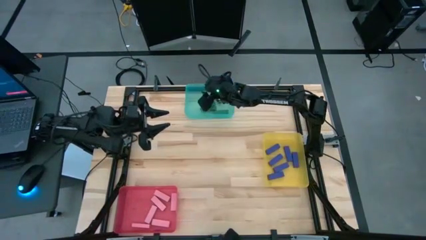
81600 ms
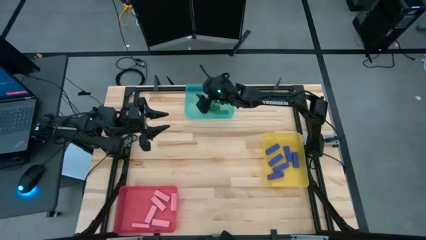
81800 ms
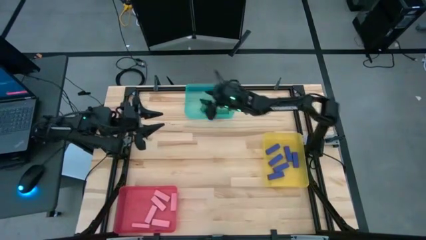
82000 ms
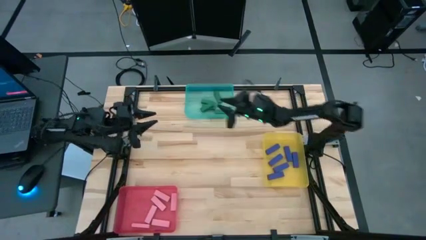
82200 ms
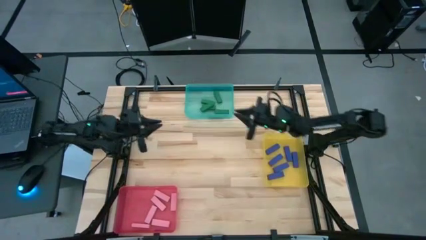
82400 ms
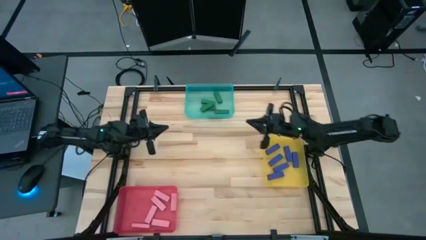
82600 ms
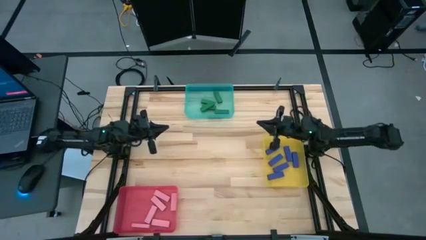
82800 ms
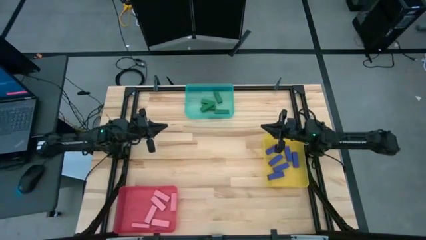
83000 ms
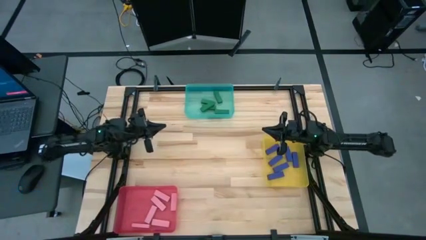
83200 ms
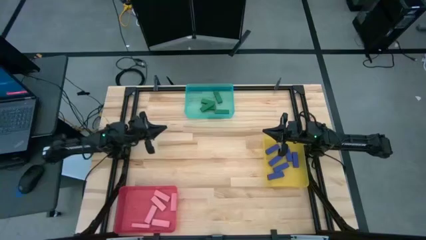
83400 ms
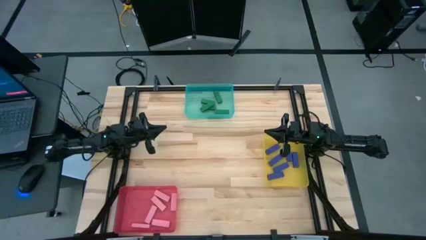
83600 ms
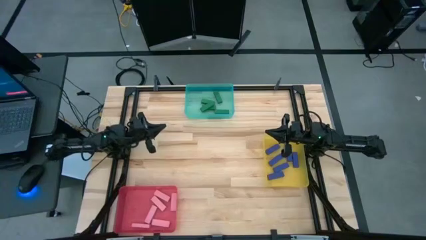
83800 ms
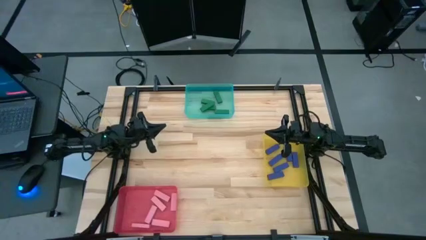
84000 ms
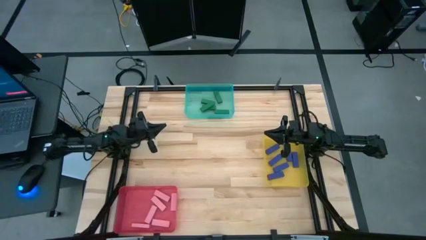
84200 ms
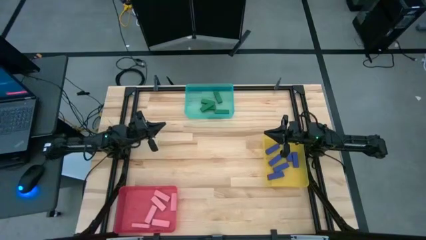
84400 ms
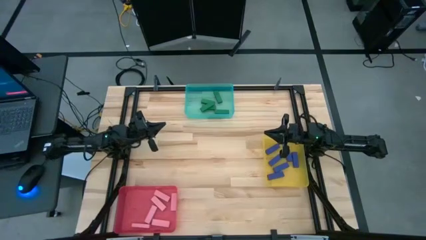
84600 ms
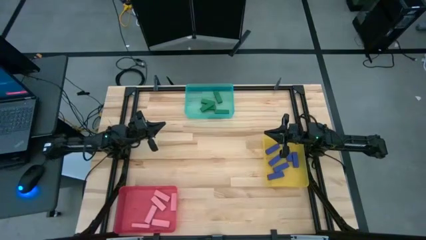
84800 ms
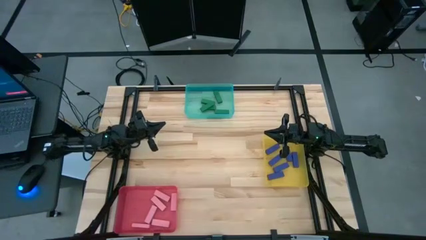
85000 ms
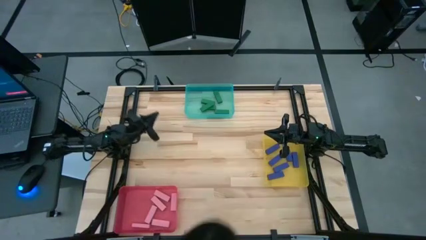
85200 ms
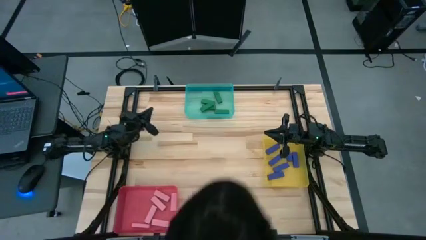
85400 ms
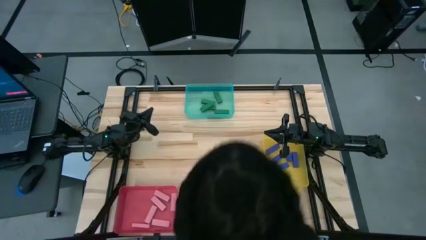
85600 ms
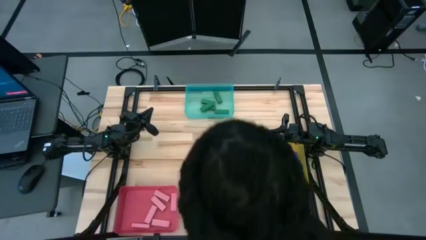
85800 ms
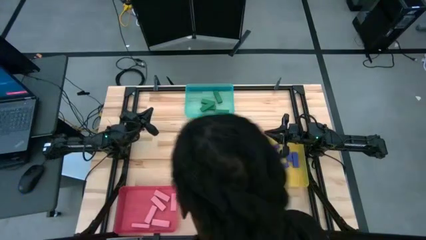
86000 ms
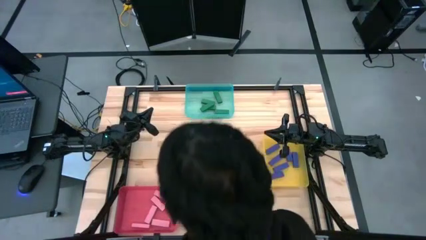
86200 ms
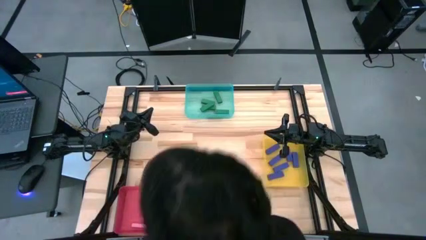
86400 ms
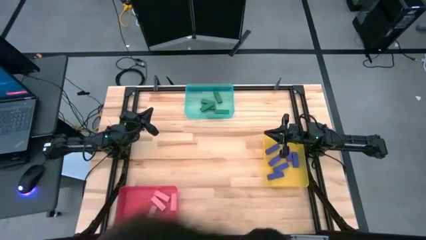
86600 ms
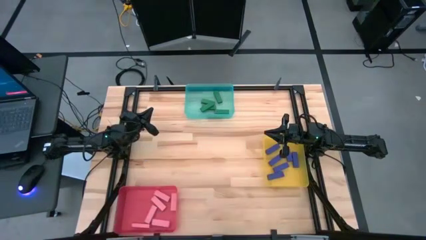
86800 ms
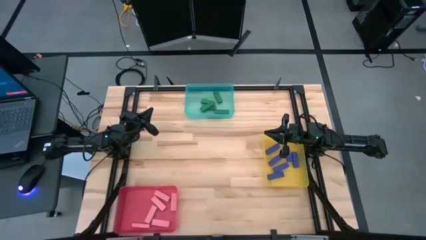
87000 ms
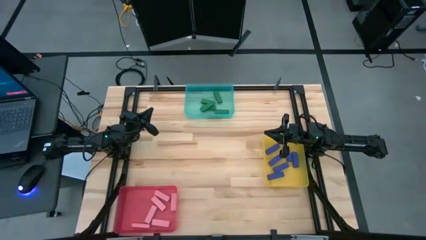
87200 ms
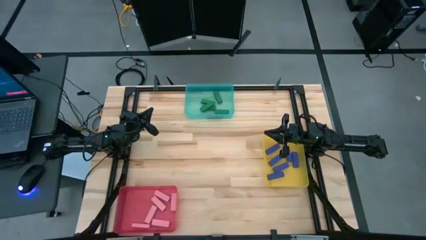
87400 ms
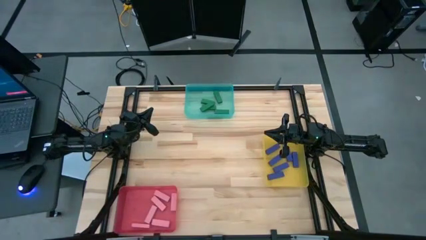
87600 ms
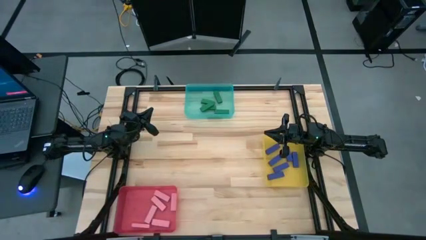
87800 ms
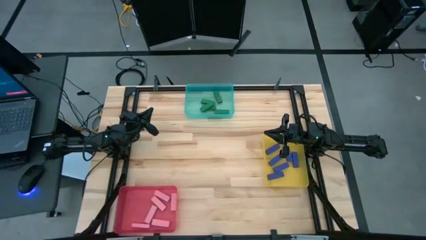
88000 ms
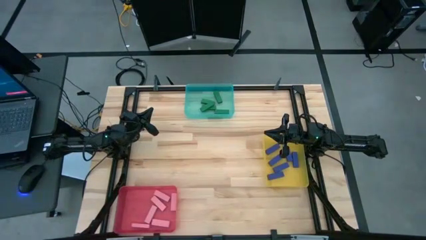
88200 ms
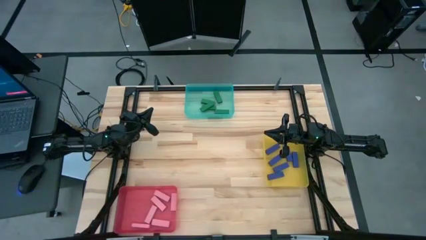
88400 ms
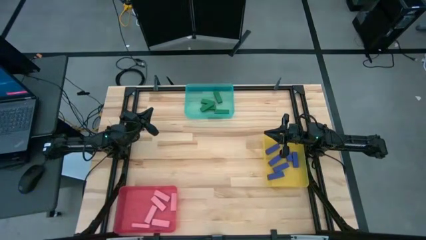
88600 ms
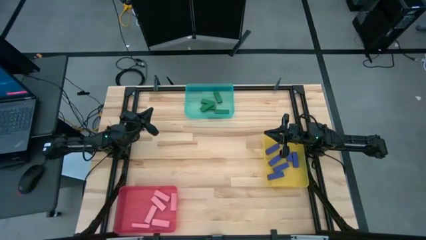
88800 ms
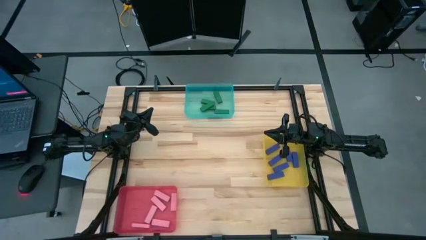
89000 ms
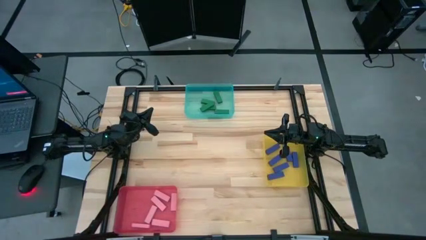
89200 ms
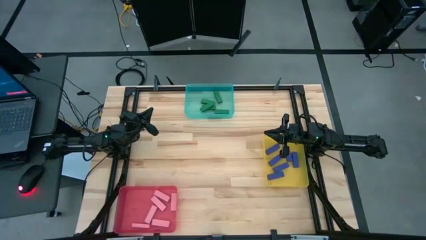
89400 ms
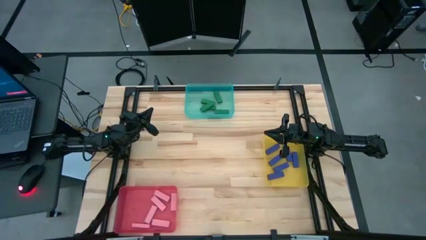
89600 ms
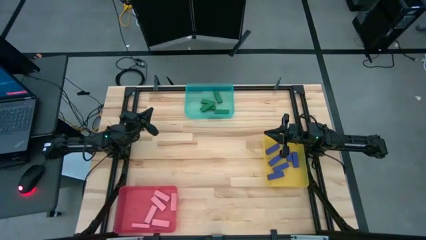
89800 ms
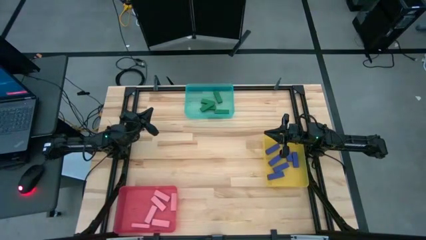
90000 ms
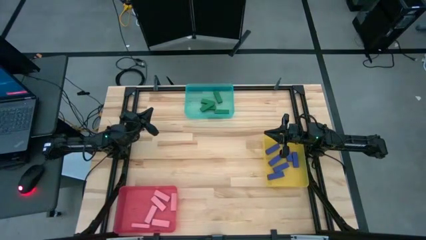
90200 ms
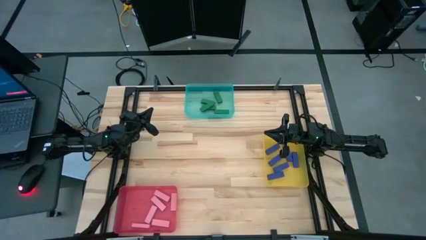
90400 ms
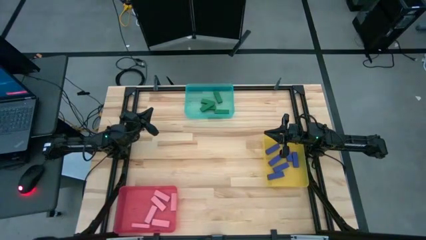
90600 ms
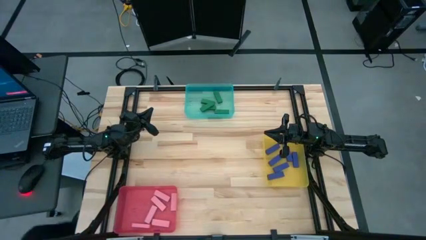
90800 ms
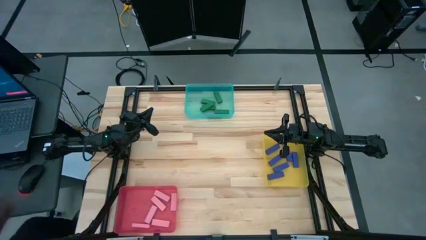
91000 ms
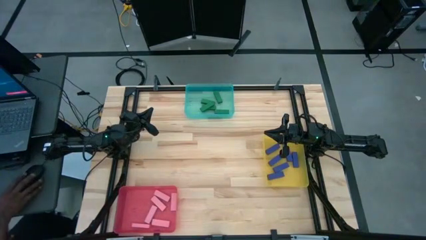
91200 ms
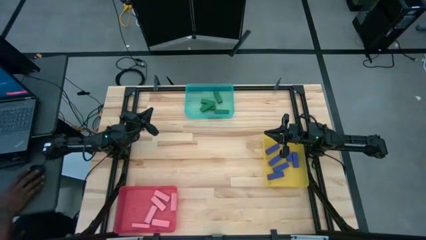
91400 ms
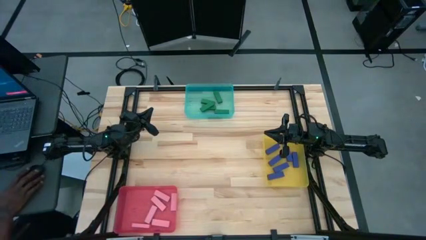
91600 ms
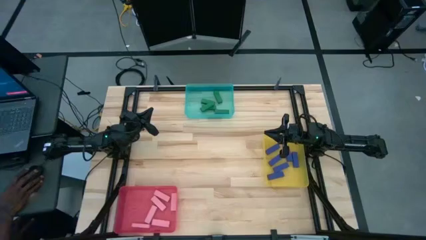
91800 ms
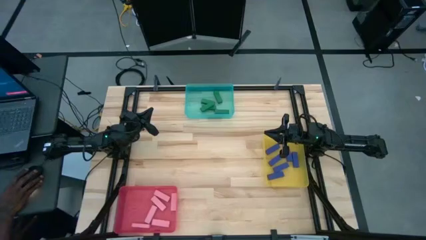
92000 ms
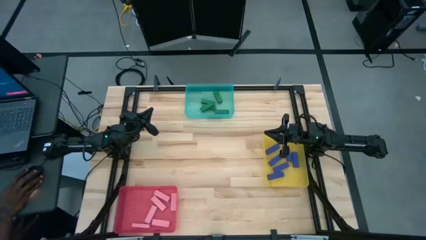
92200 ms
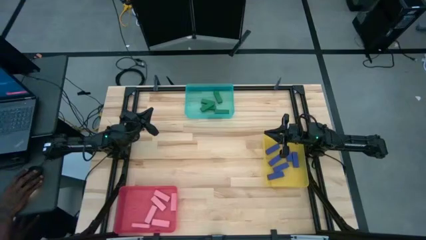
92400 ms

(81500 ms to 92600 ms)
Task: Sort blocks
Return to Home Position

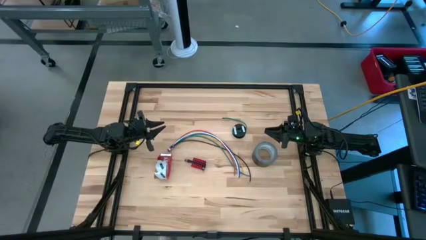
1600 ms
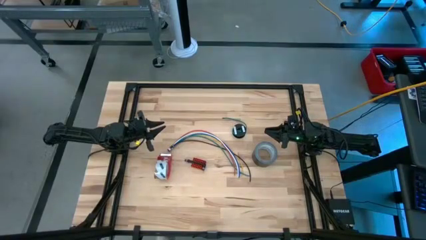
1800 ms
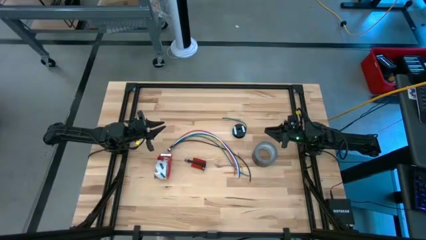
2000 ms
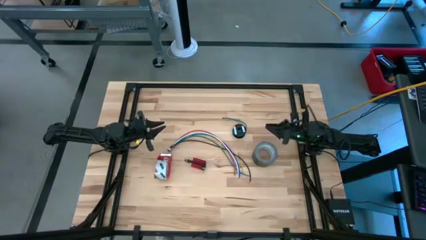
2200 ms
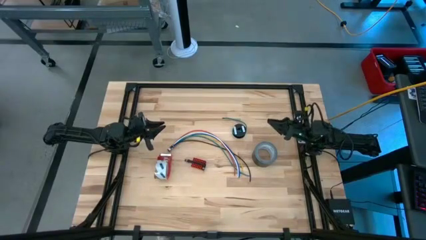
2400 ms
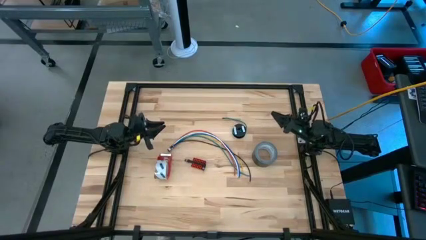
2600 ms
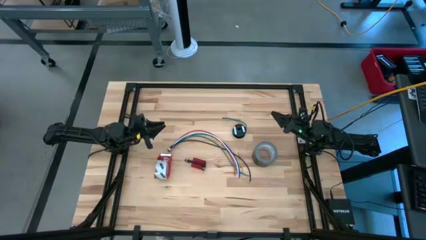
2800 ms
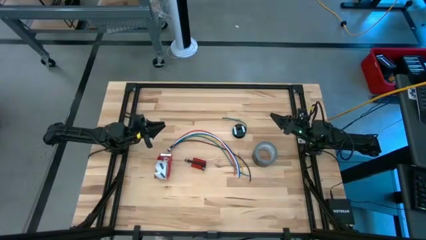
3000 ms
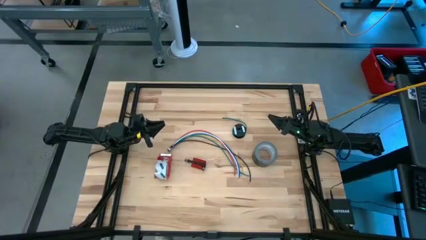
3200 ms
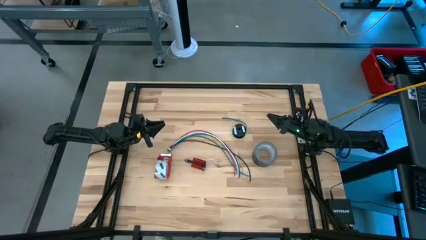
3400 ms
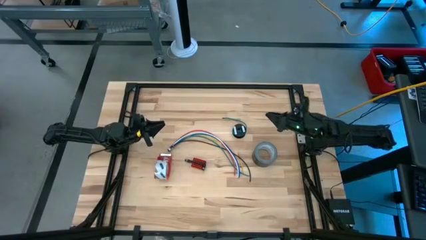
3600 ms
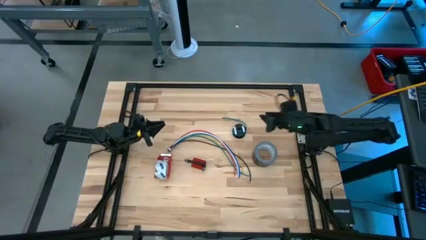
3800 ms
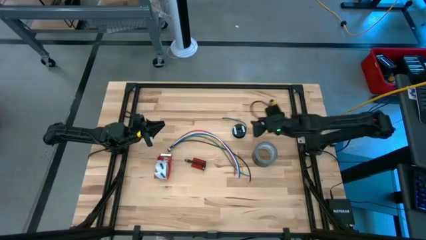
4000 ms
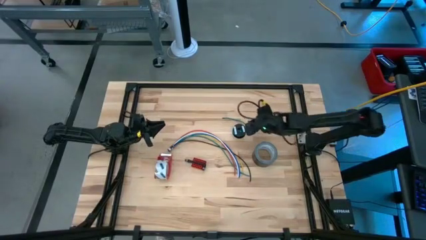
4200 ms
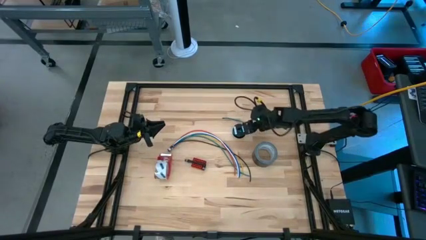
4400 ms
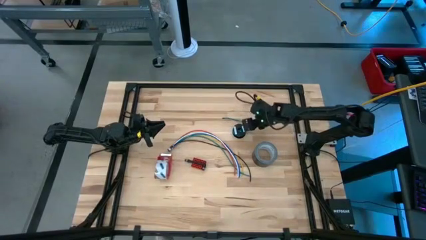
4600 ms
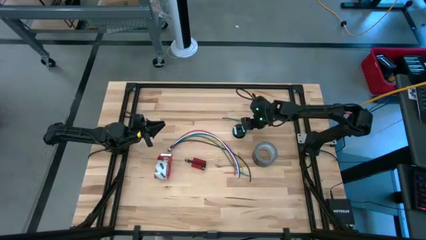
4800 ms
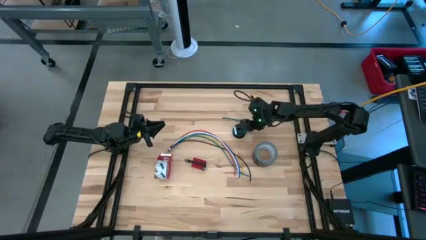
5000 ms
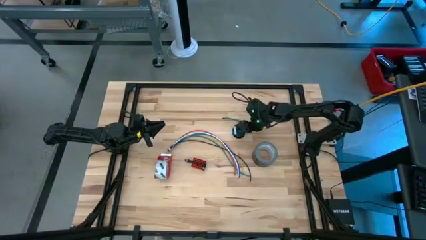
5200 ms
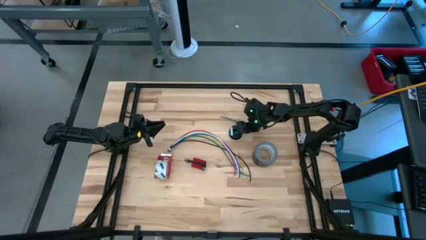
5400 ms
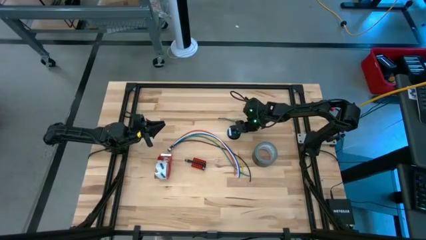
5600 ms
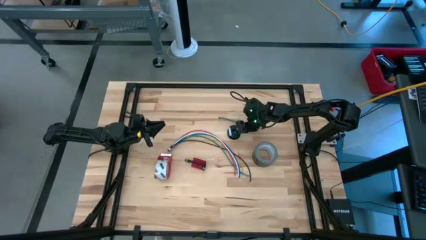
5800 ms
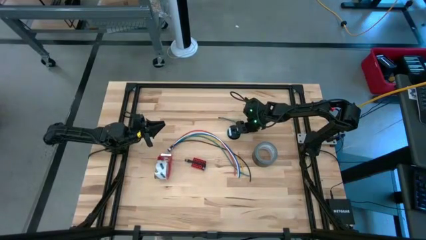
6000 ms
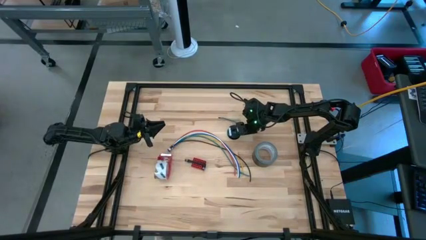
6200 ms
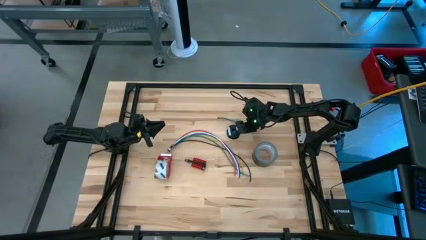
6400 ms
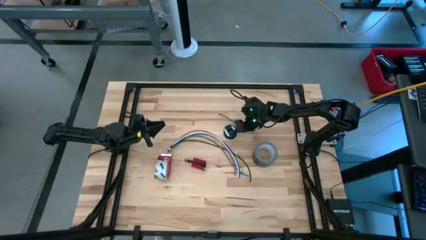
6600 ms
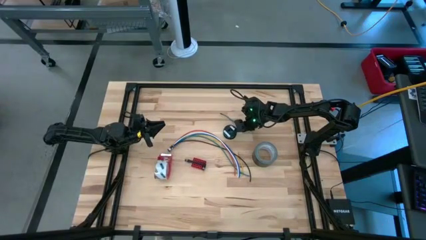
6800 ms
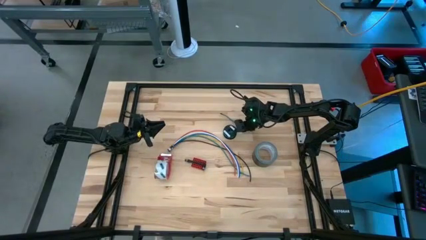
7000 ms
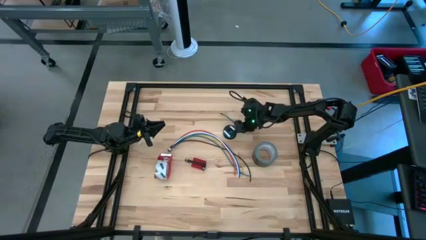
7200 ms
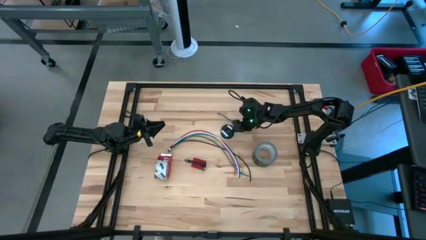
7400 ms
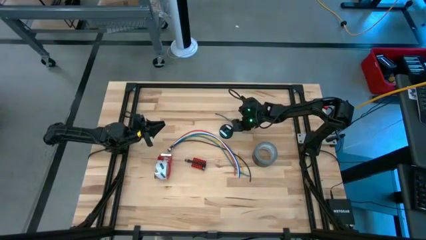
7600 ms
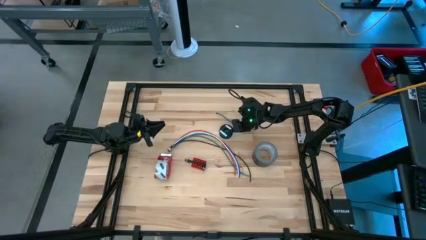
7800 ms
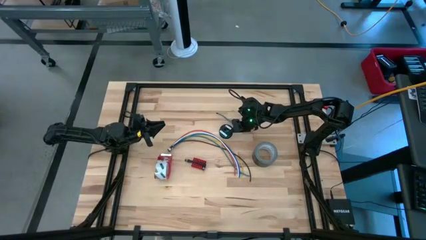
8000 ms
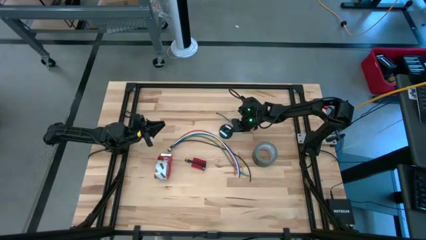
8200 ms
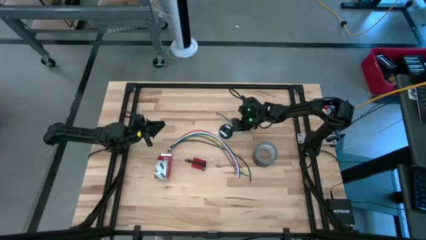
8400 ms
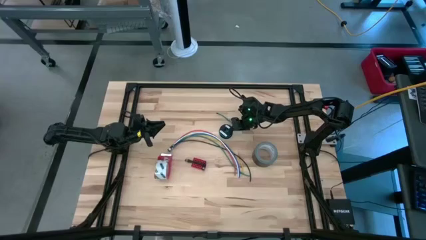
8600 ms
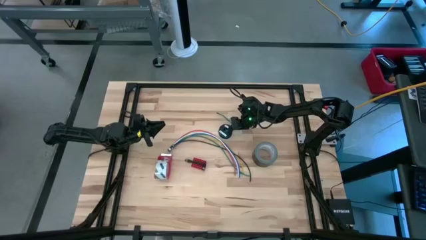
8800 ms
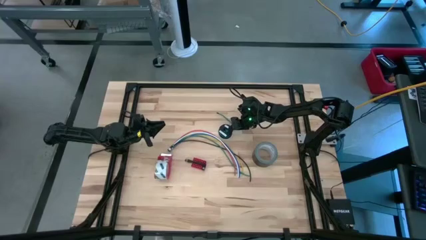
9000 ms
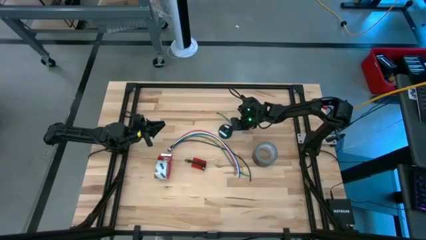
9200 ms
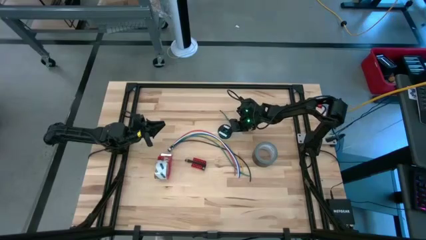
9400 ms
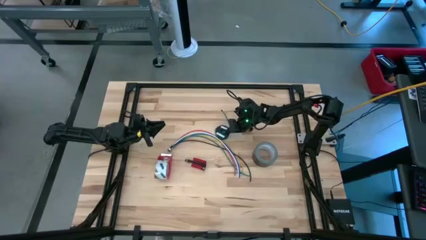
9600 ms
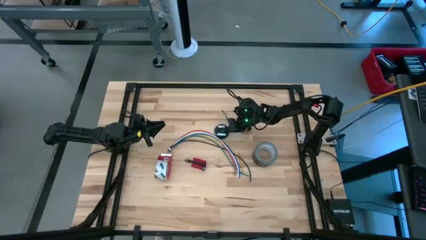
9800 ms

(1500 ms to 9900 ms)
Task: Coil cords
Uncoil the green wire from the black spool
